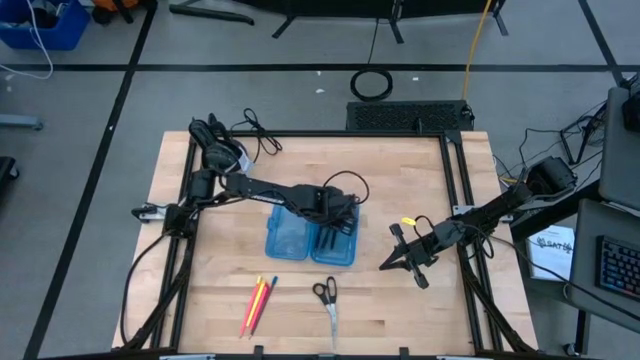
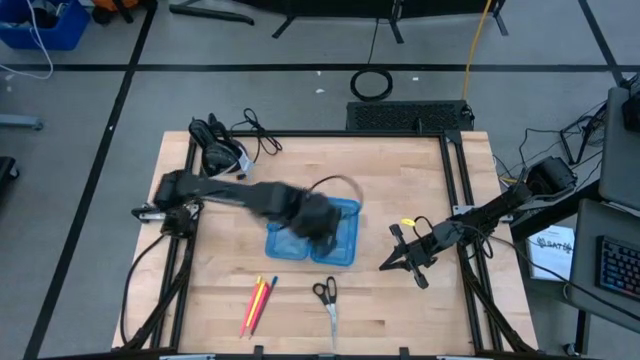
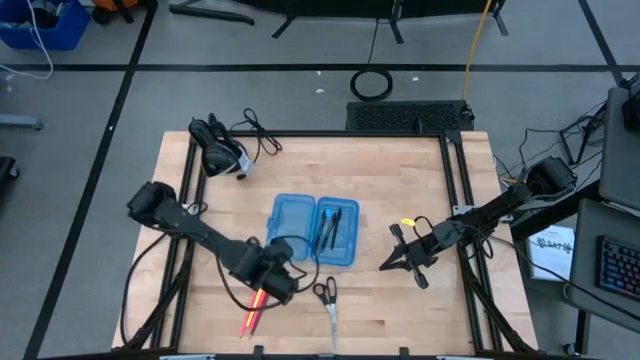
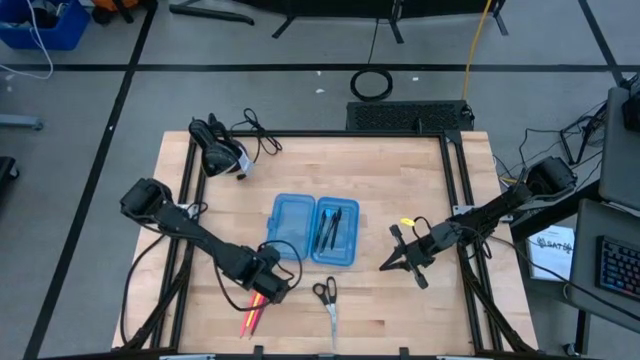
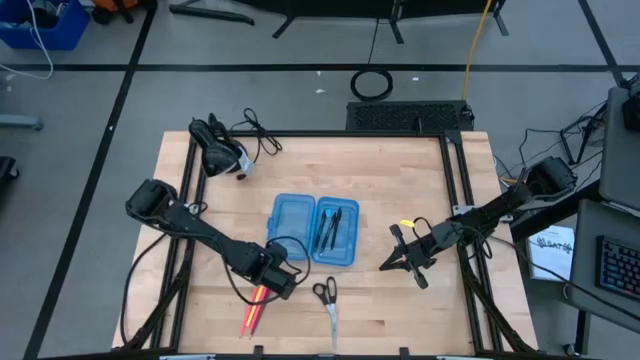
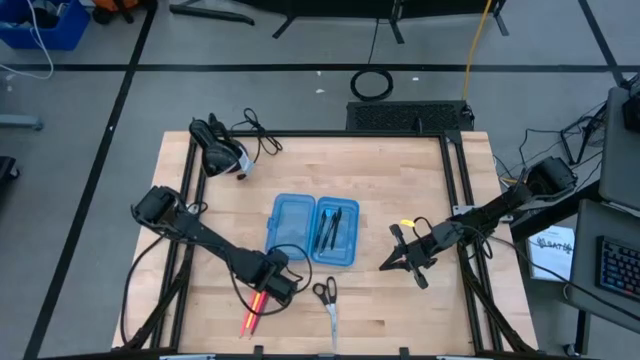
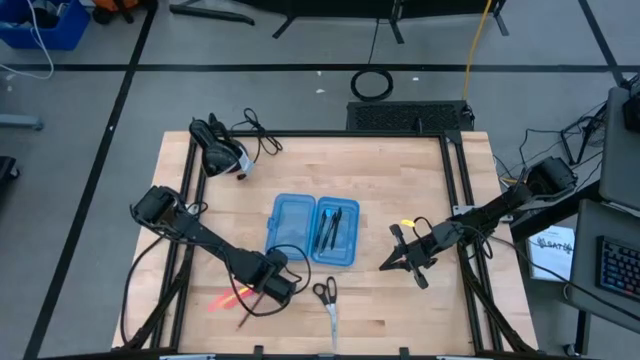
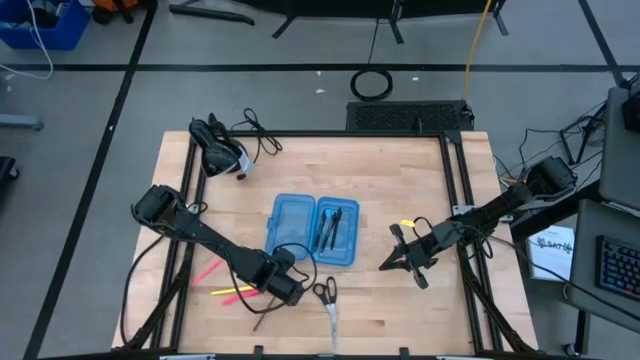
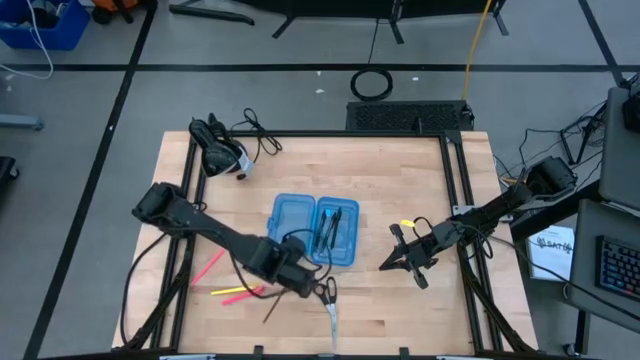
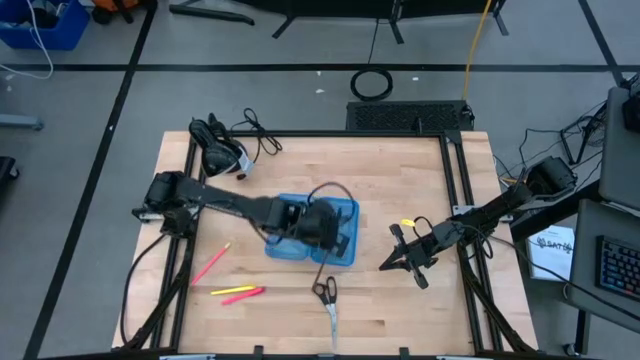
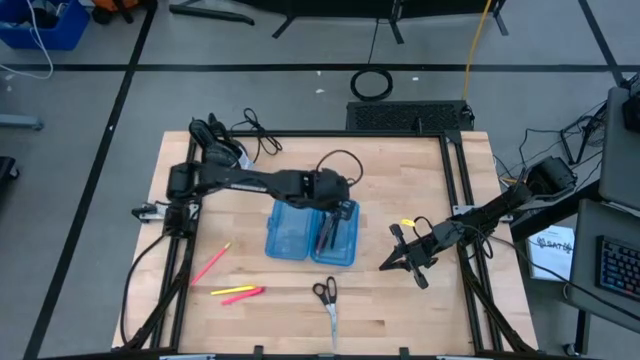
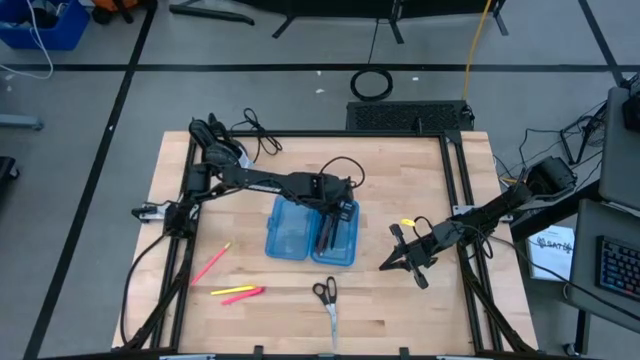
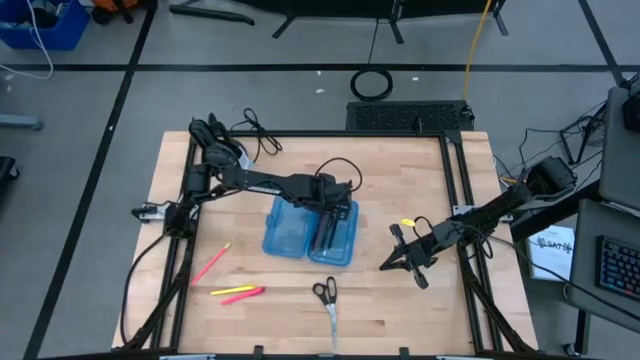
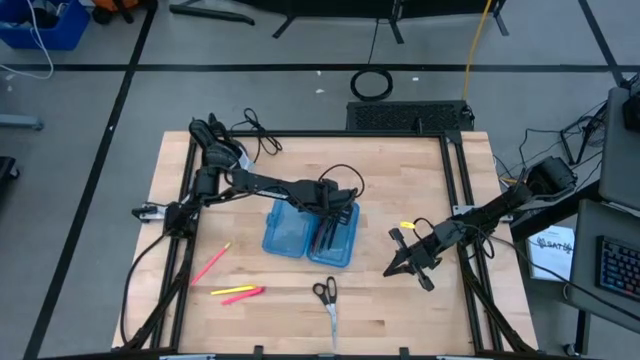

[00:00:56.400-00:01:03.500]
Task: Pick & place school supplies into a supply box
Put the brown pencil into the supply box

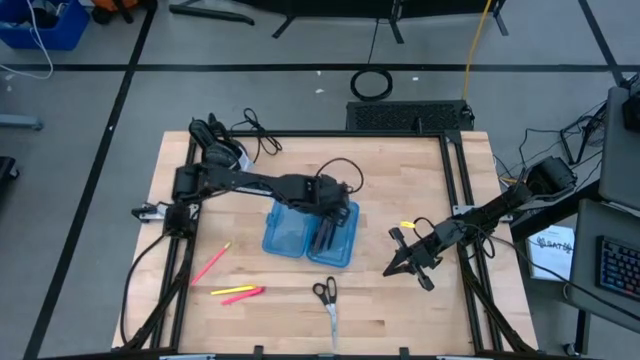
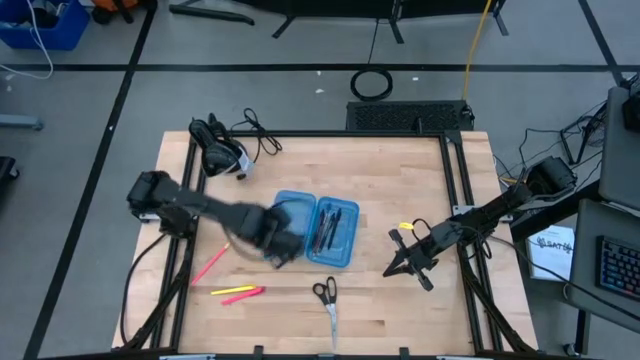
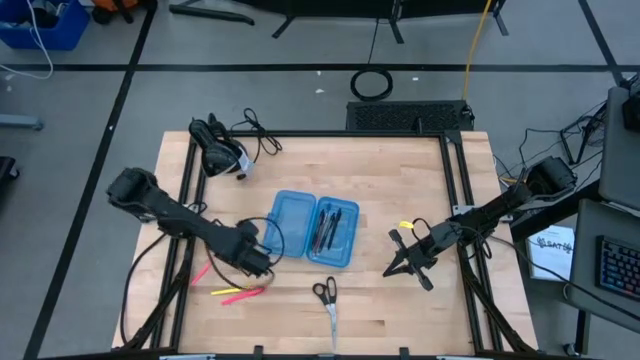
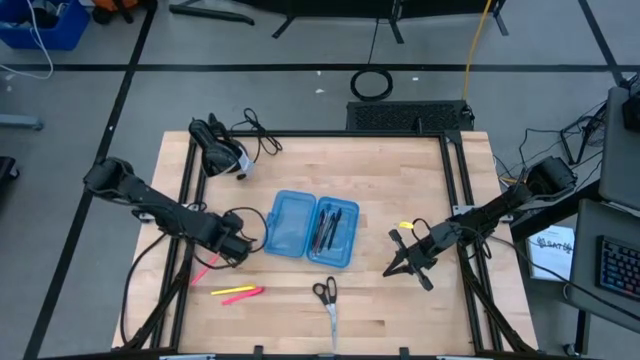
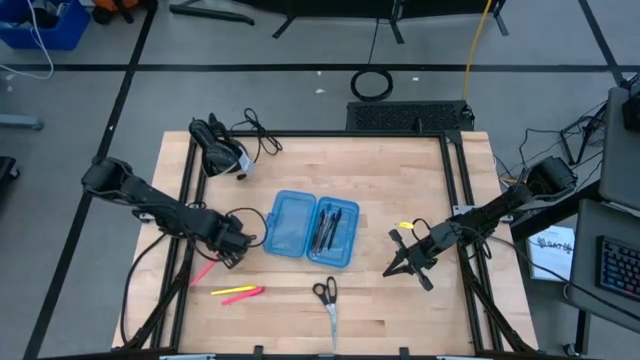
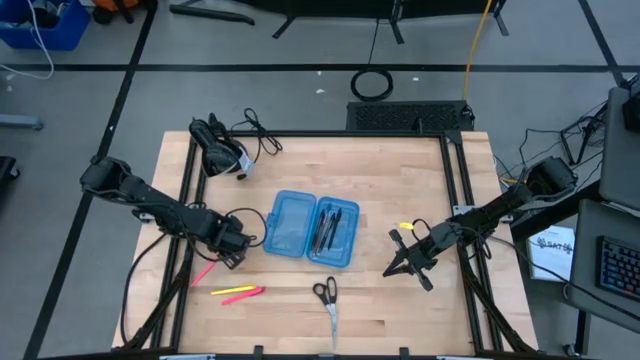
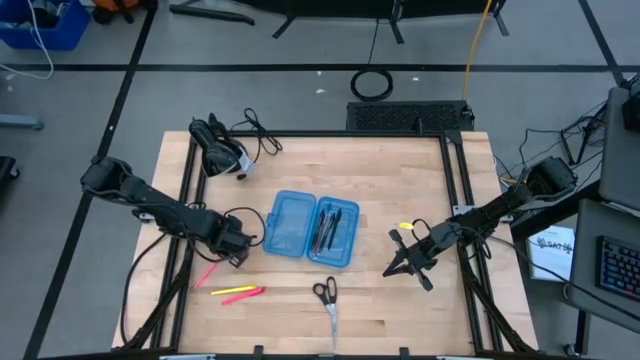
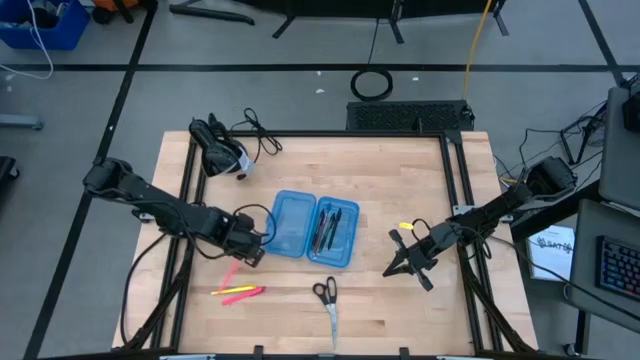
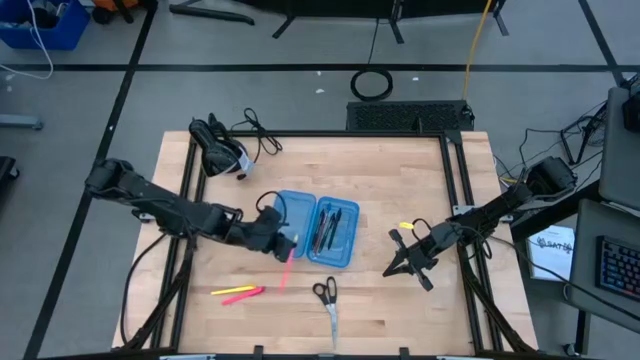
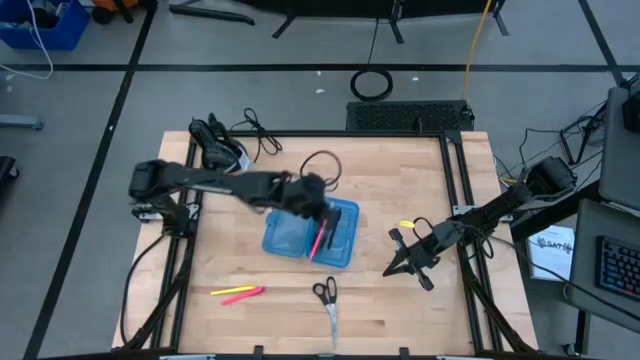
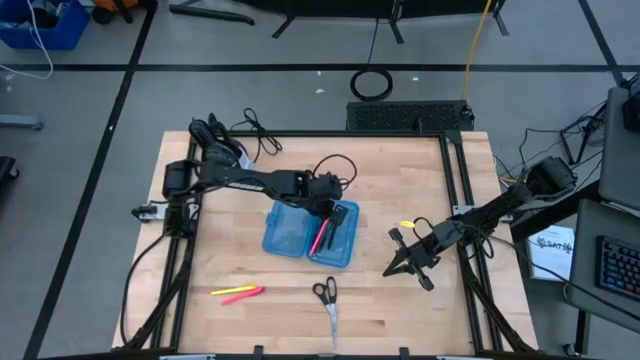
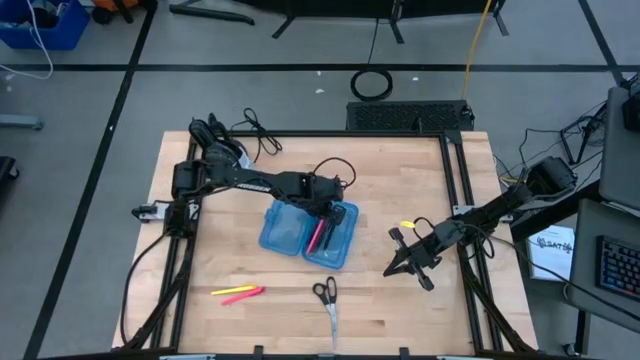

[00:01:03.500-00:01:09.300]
Put the pink pencil into the supply box

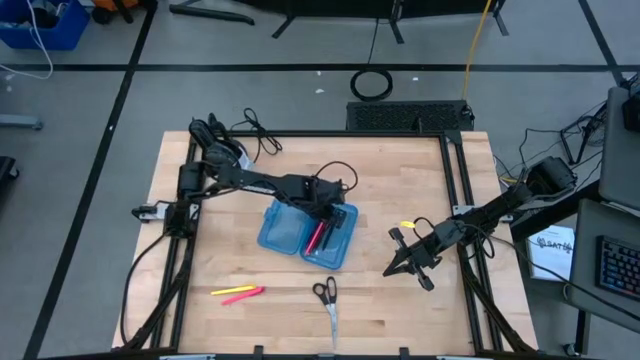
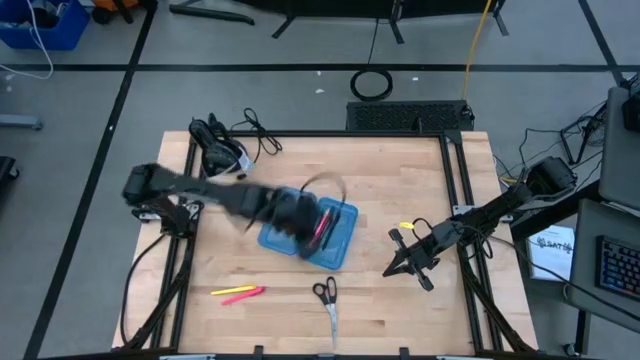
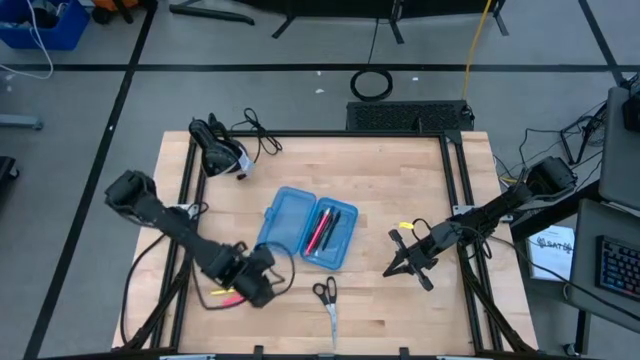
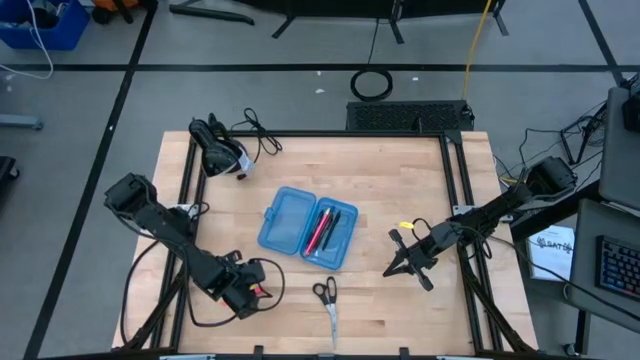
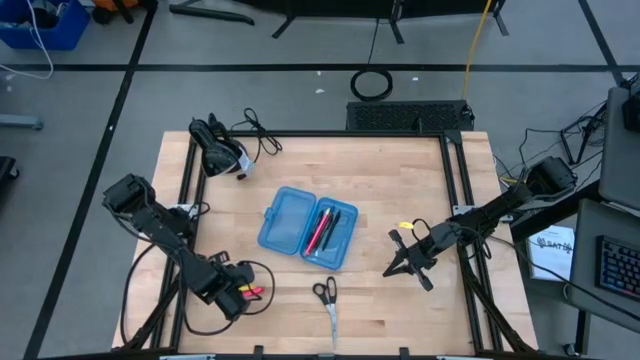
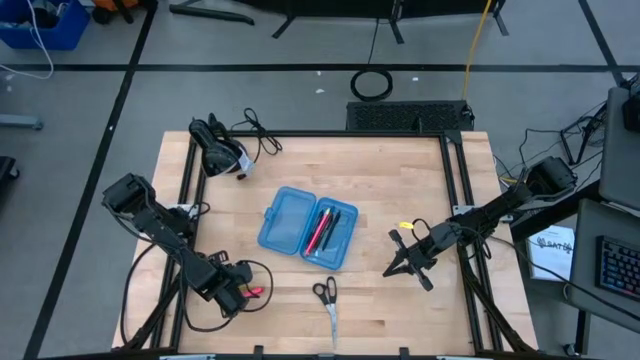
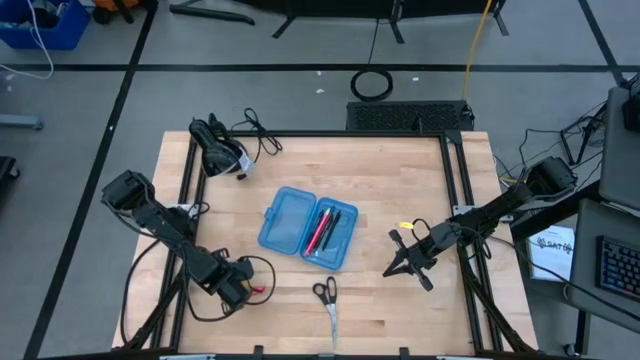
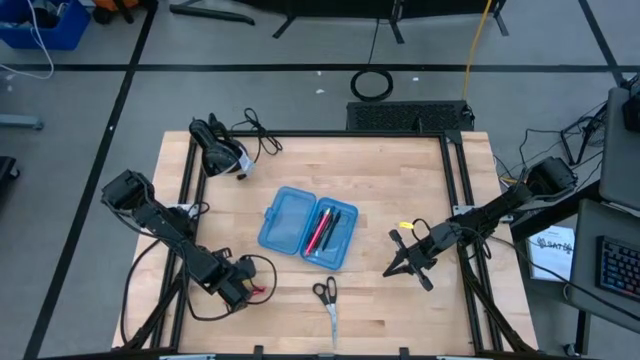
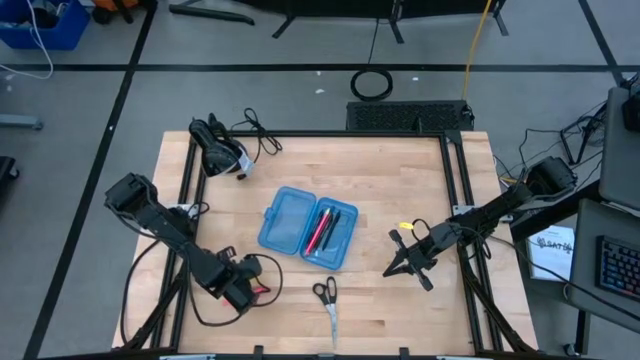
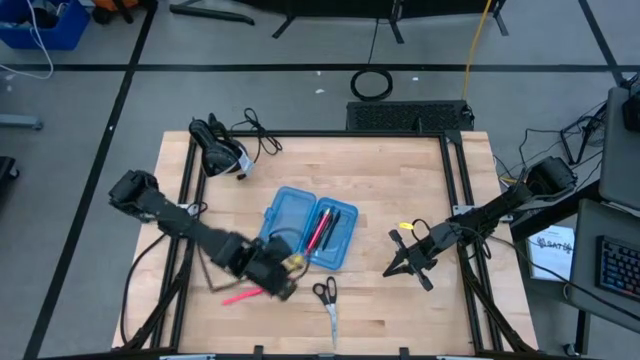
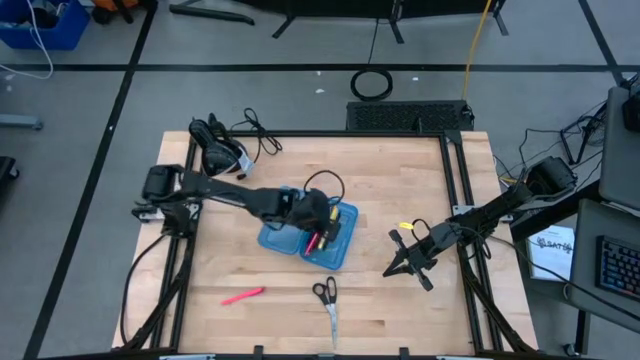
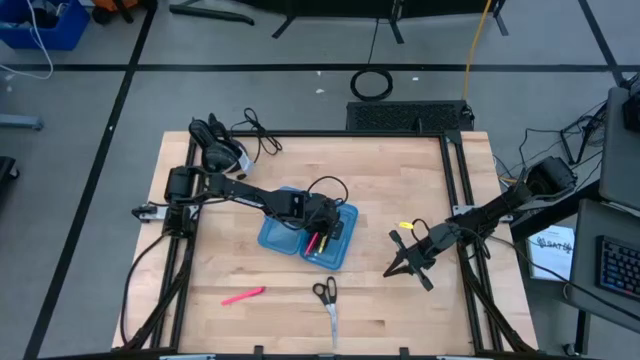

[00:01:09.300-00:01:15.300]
Put the yellow pen into the supply box

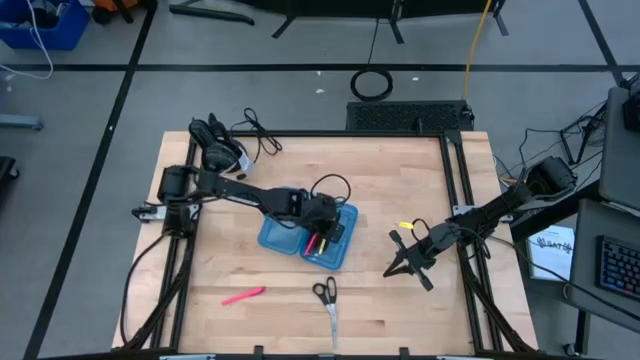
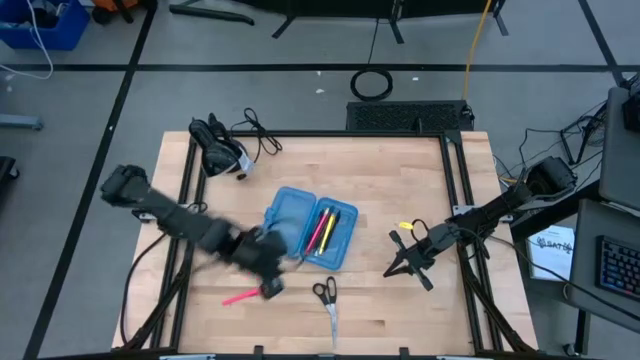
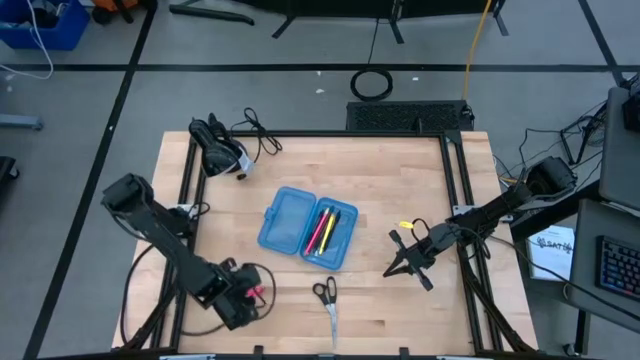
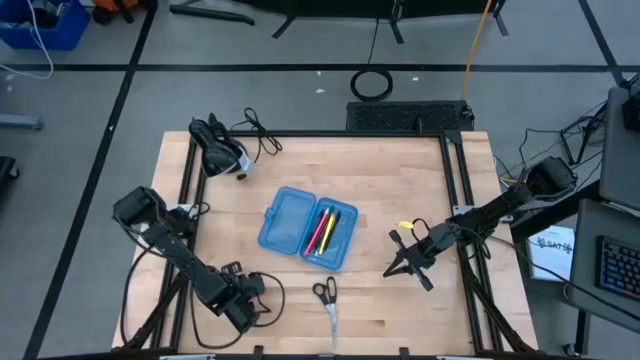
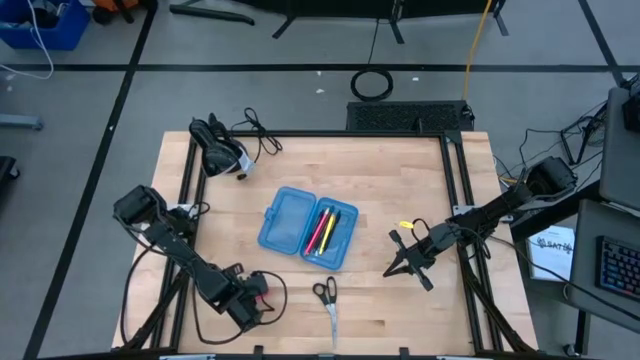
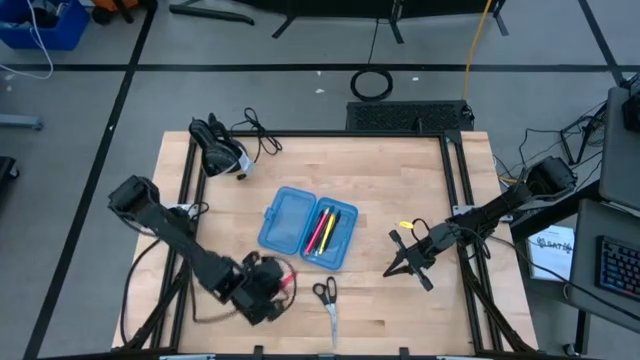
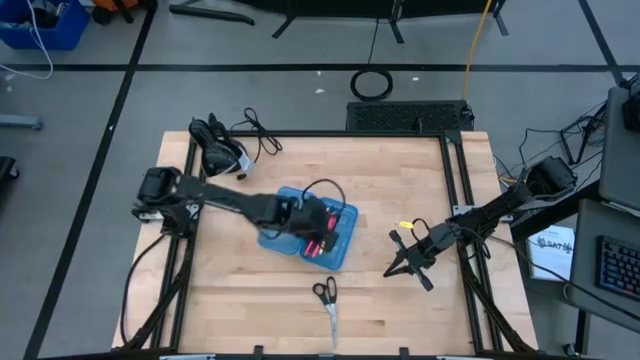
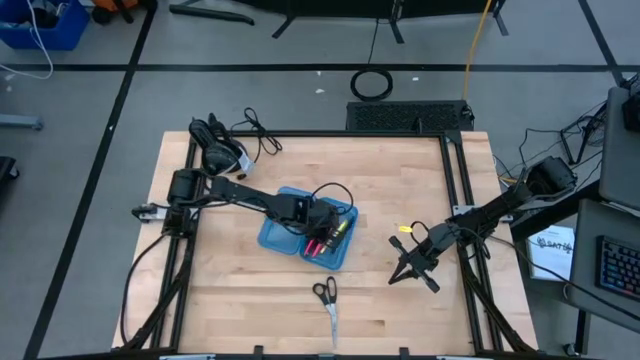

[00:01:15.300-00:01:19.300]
Put the pink pen into the supply box
